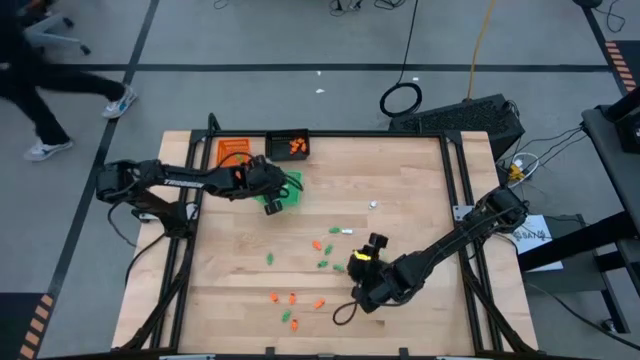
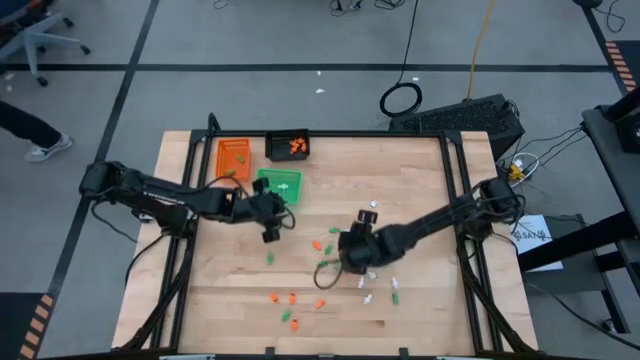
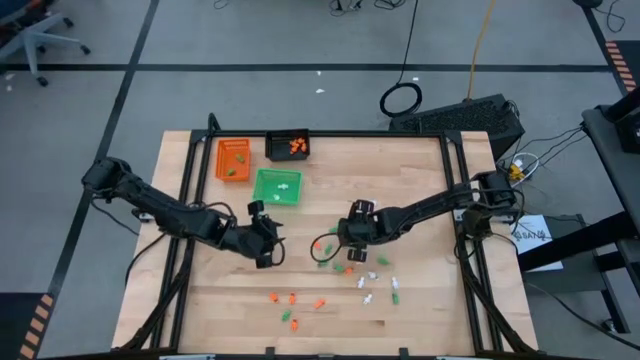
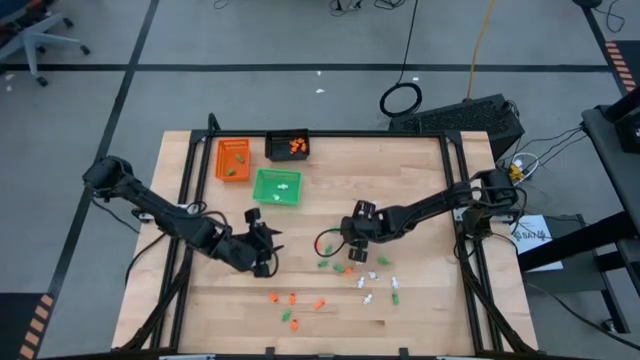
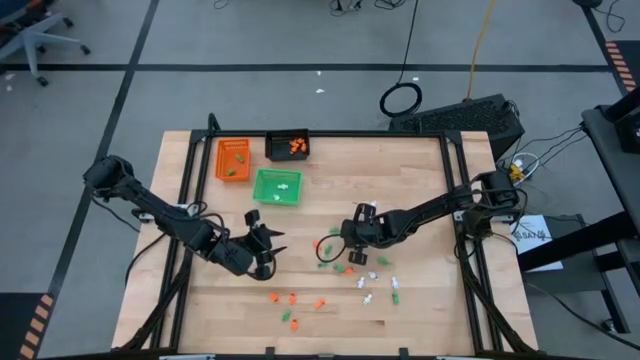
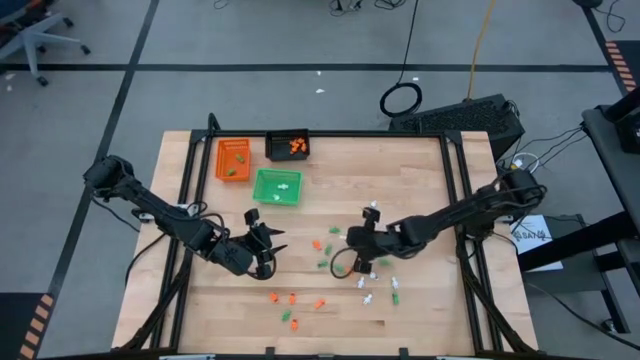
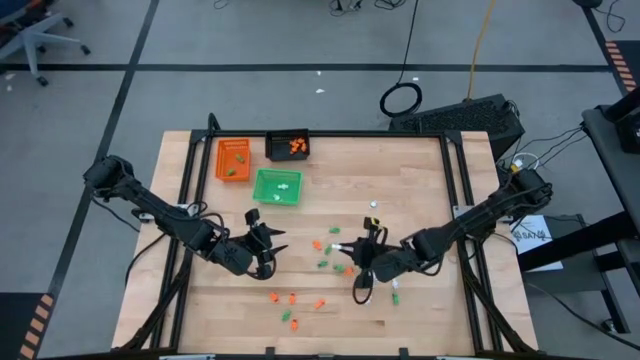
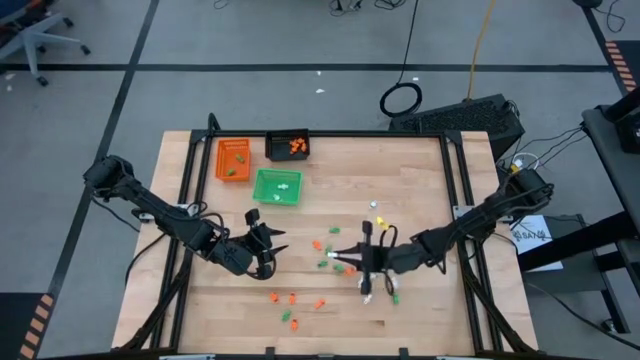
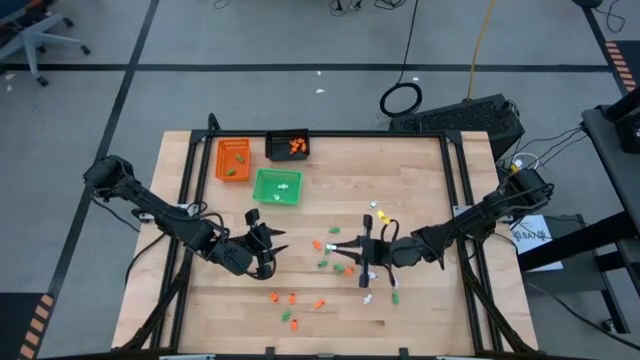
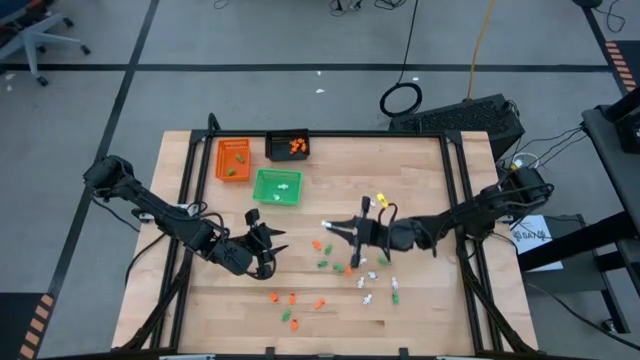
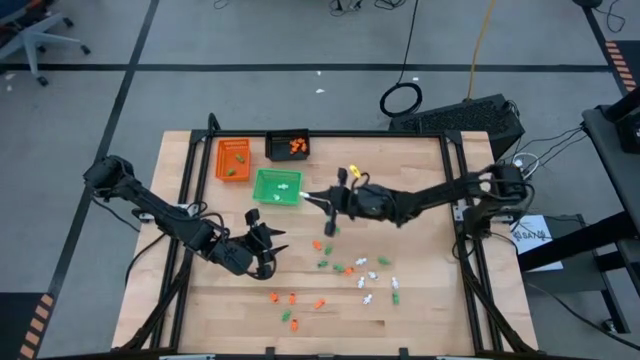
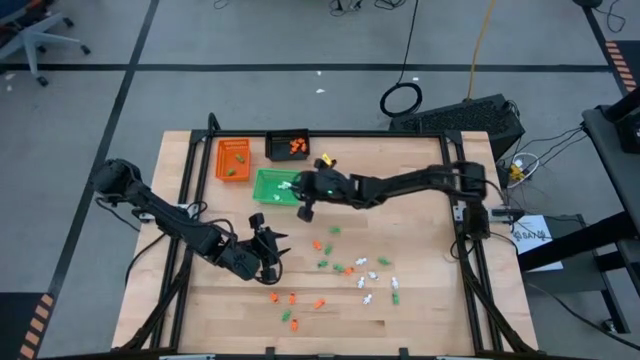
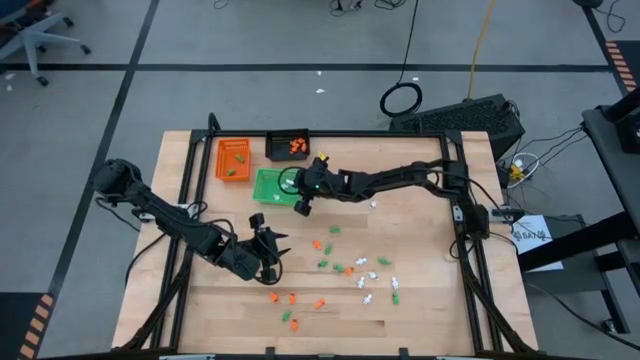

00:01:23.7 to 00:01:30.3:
Task: Sort Halloween decoration
Put the white skeleton toy into the green bin

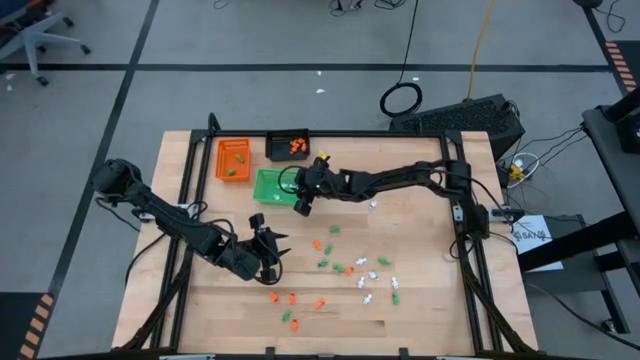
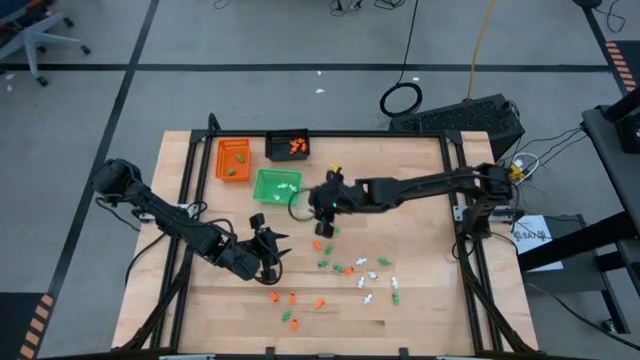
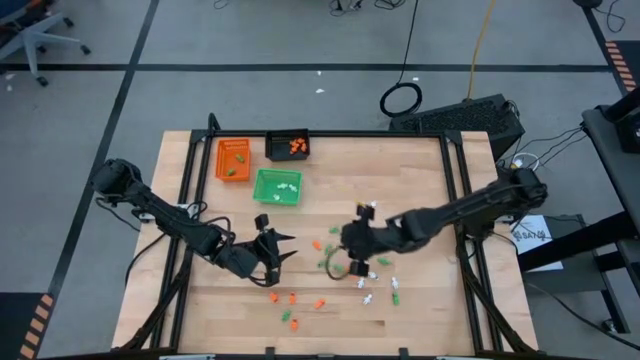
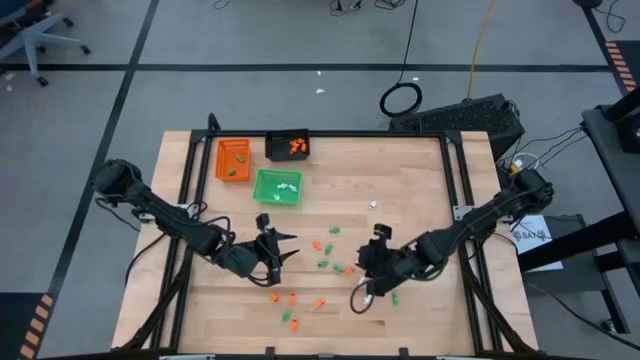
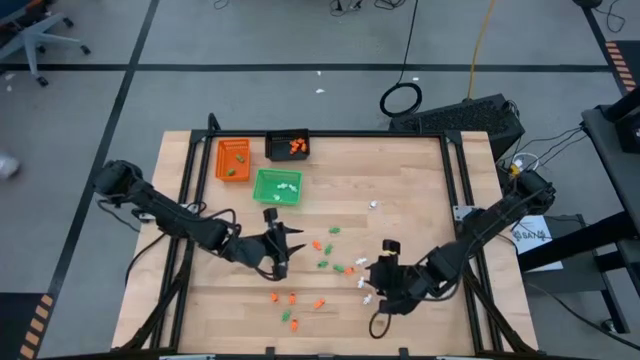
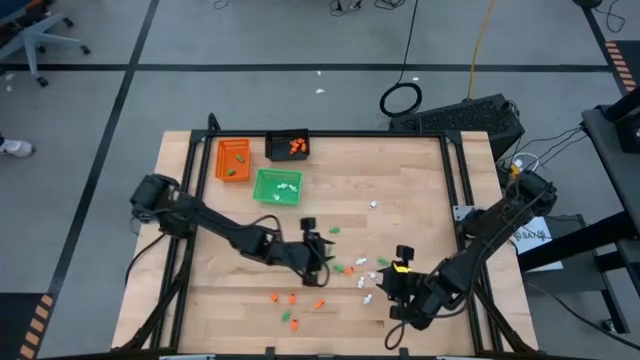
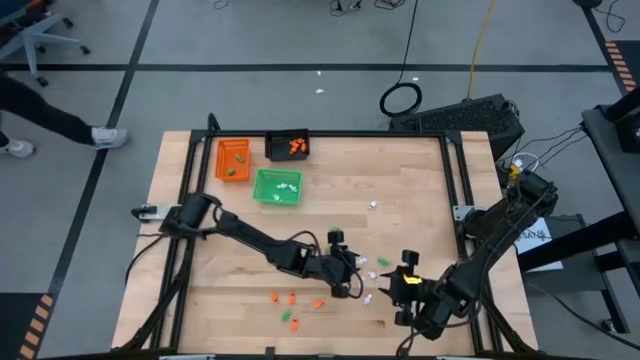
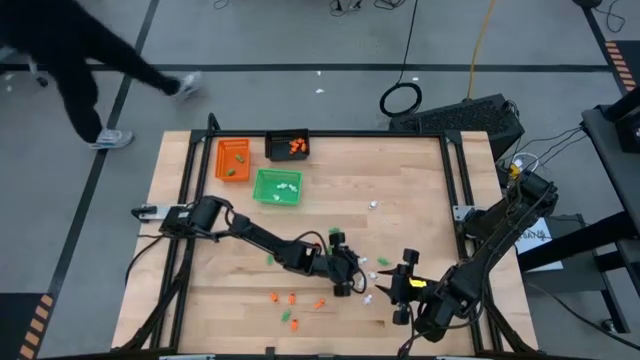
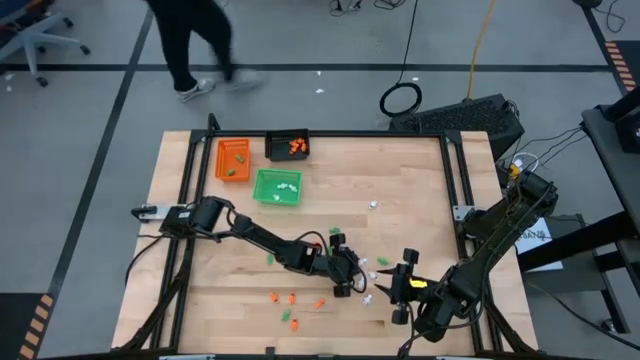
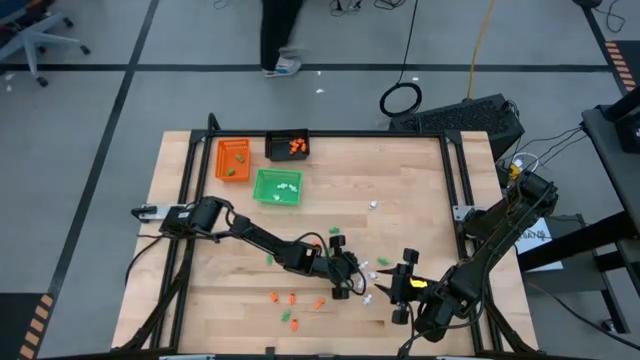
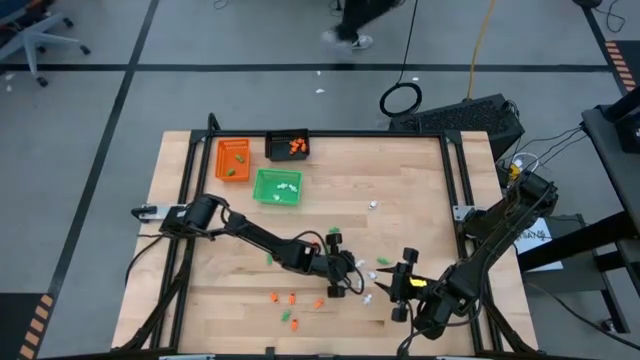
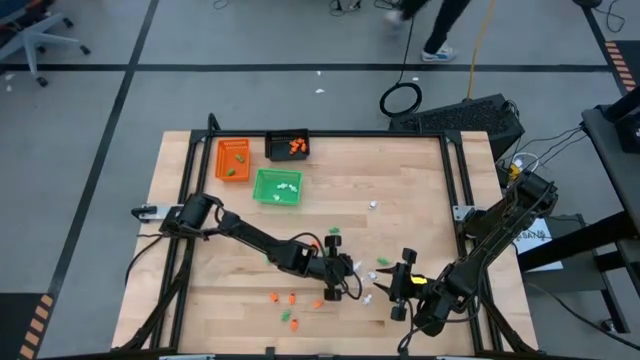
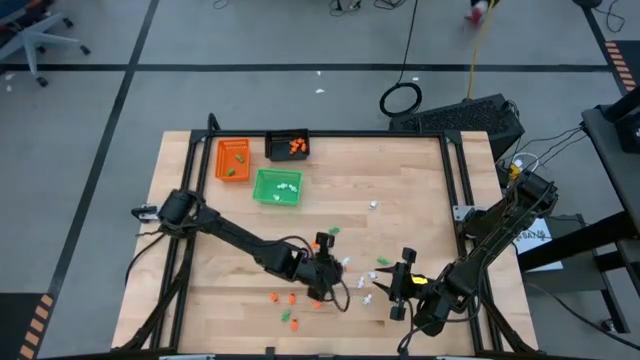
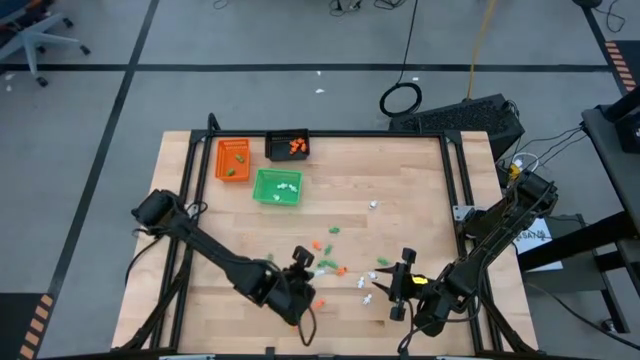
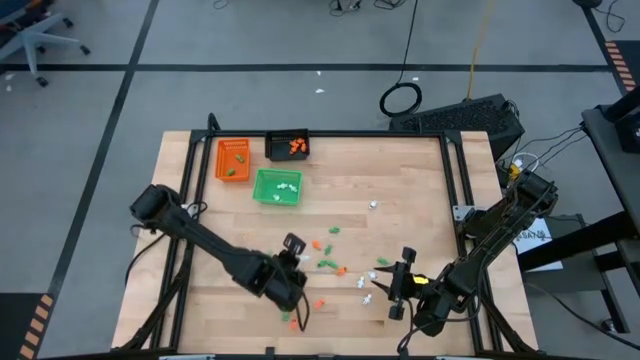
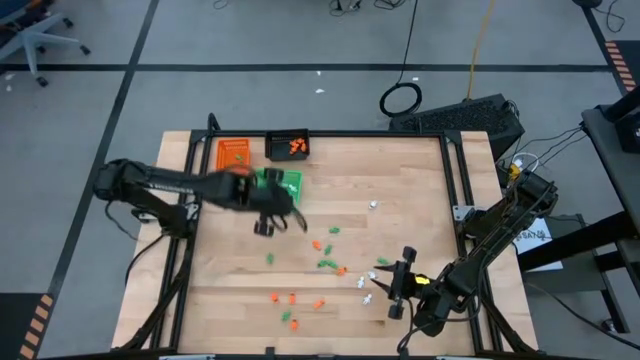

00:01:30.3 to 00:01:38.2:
Put the white skeleton toy into the green bin

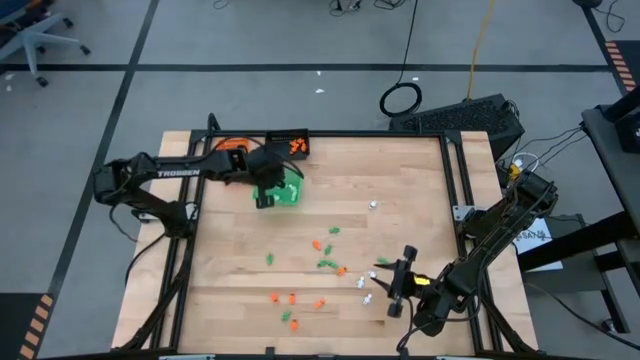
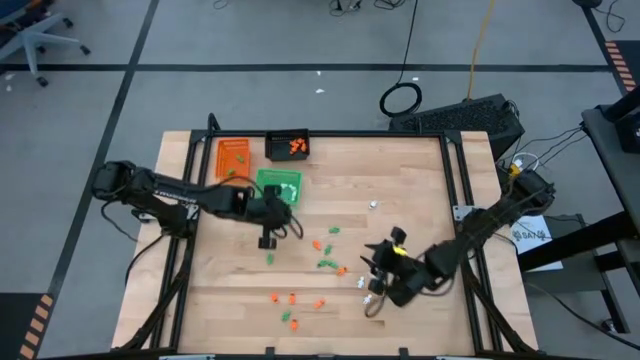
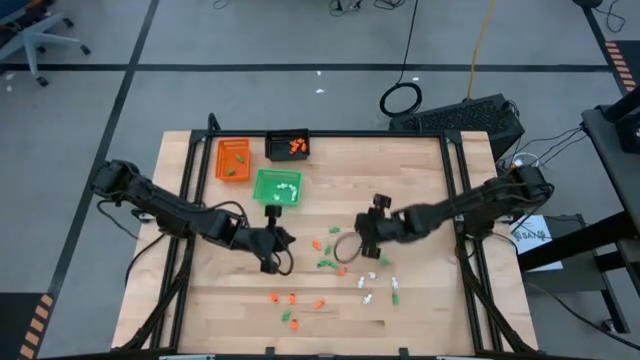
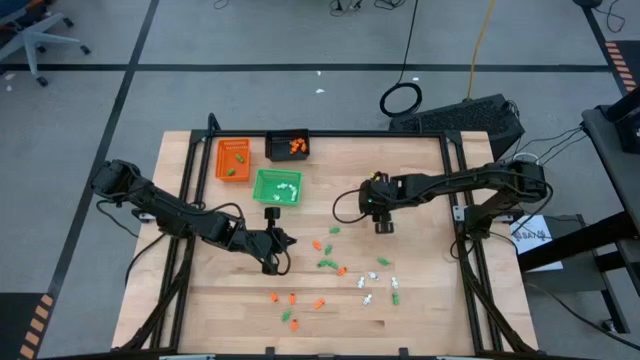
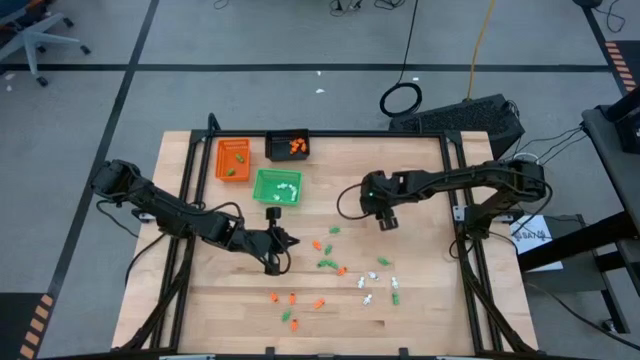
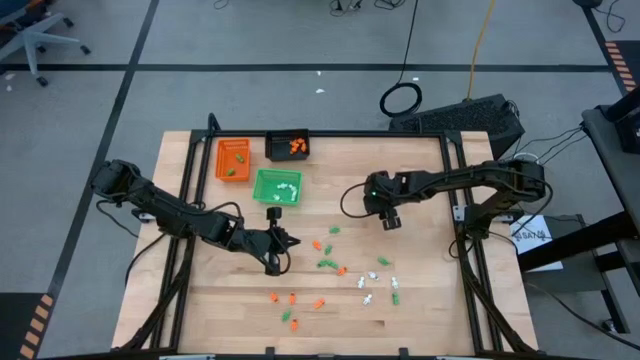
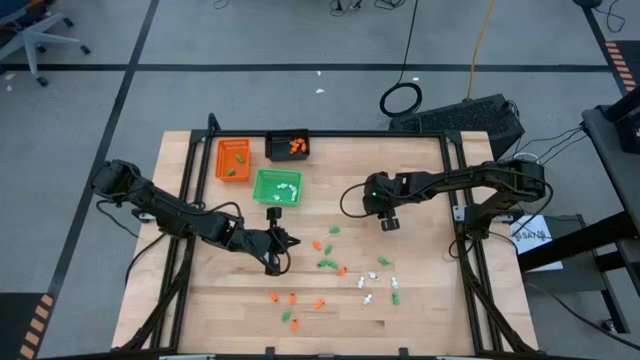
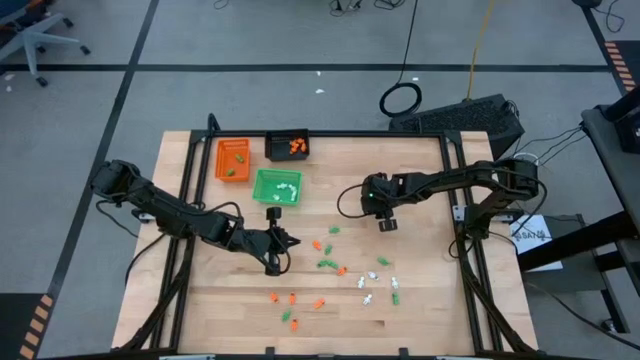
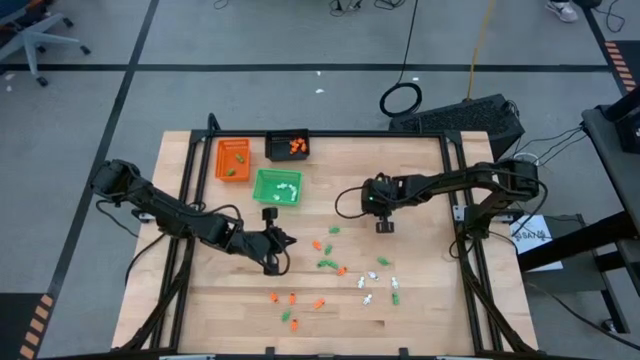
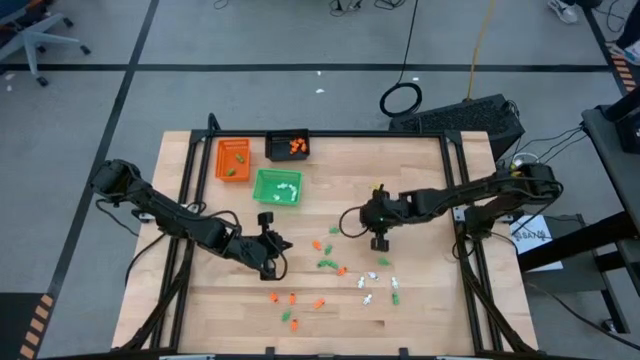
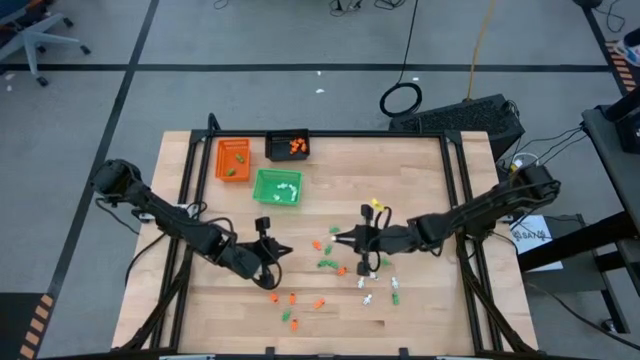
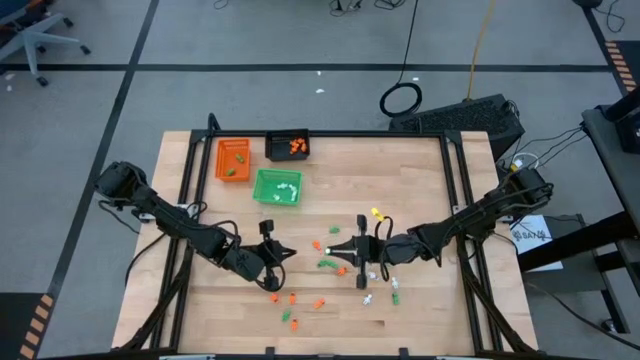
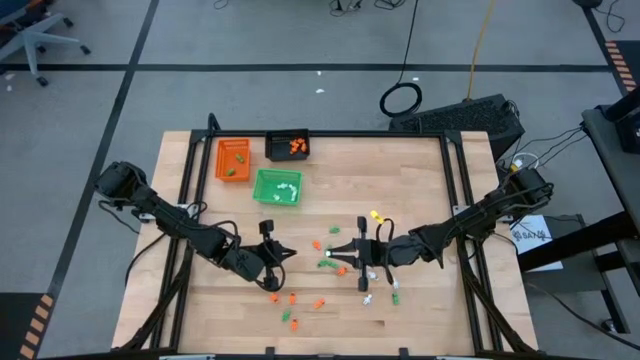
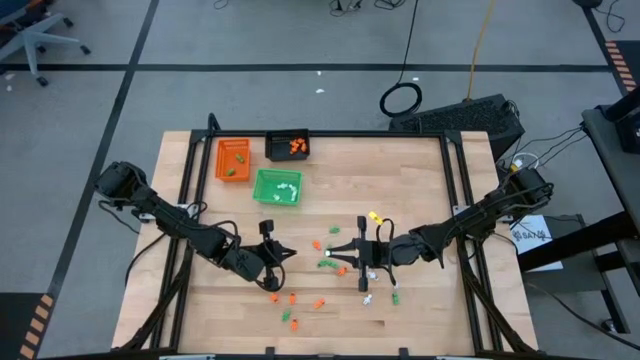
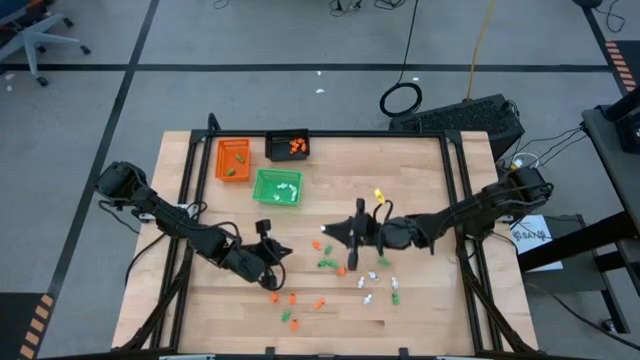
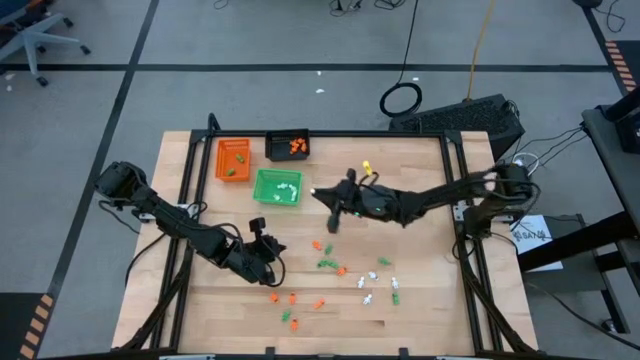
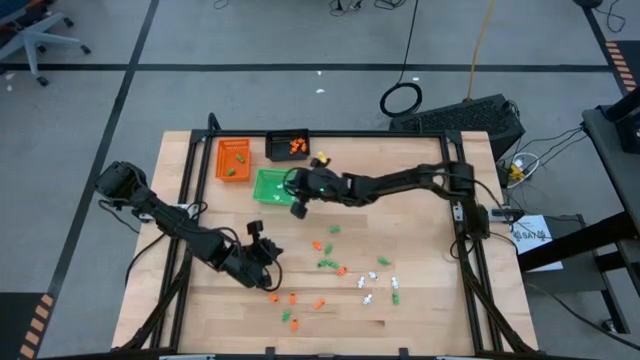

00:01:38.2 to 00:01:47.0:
Put the white skeleton toy into the green bin
